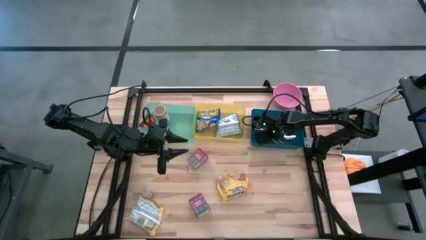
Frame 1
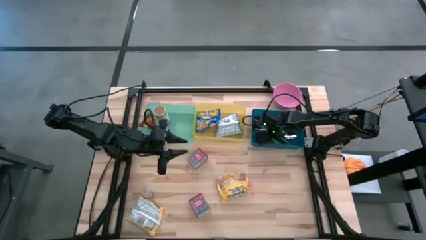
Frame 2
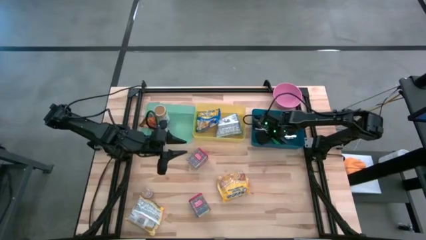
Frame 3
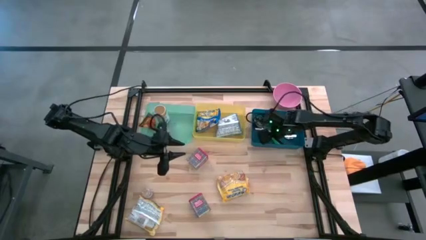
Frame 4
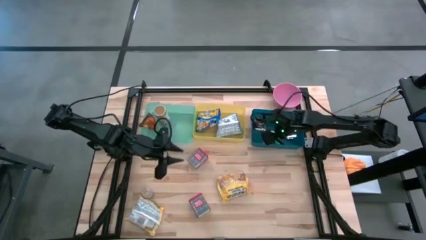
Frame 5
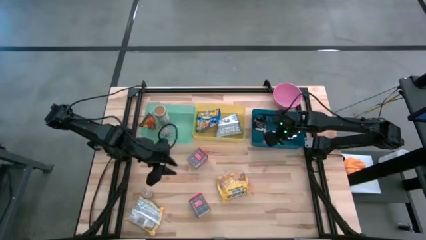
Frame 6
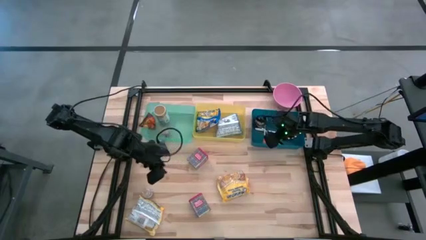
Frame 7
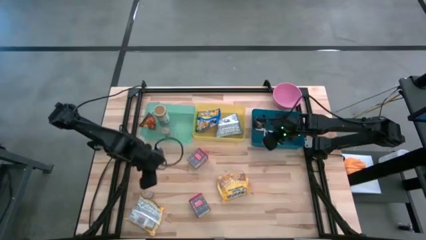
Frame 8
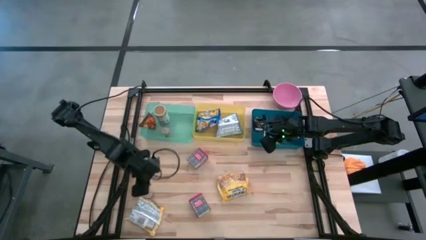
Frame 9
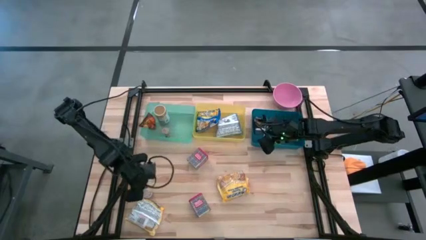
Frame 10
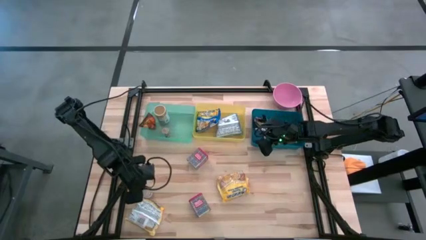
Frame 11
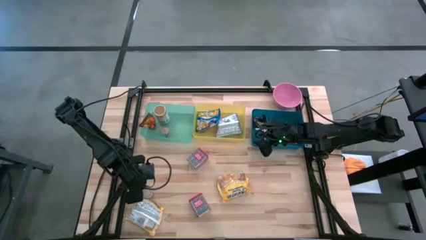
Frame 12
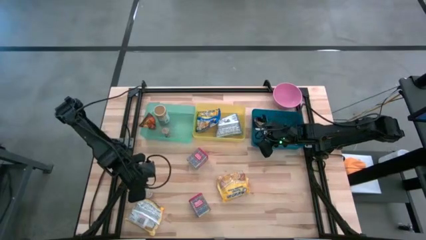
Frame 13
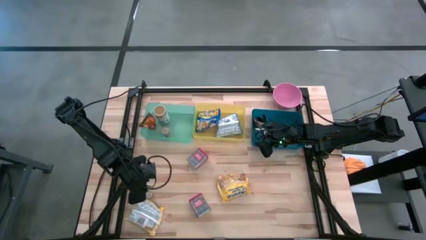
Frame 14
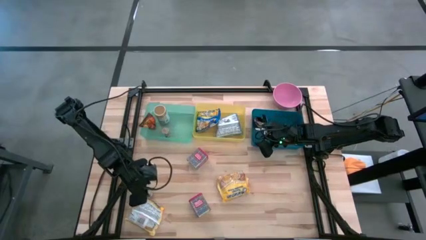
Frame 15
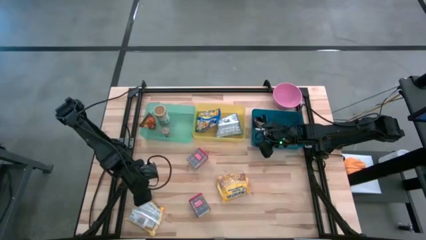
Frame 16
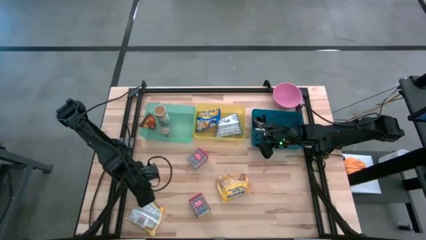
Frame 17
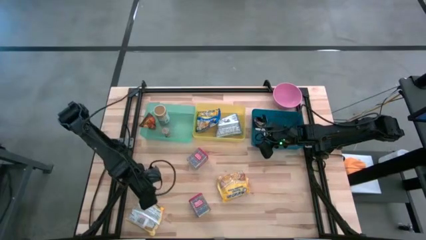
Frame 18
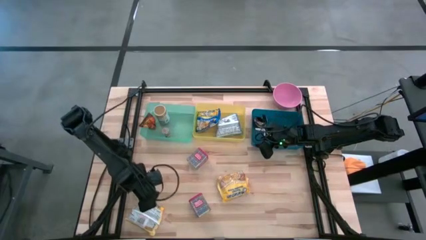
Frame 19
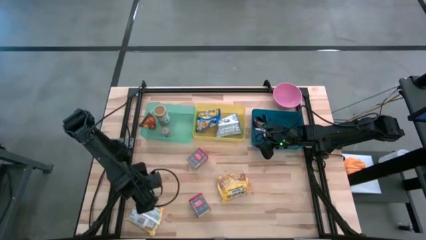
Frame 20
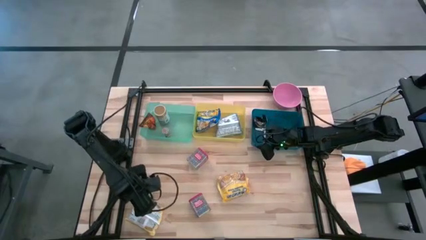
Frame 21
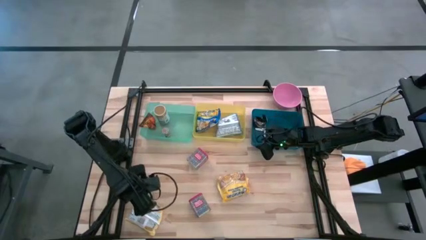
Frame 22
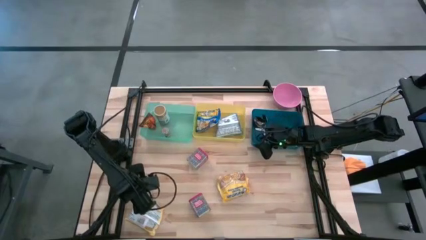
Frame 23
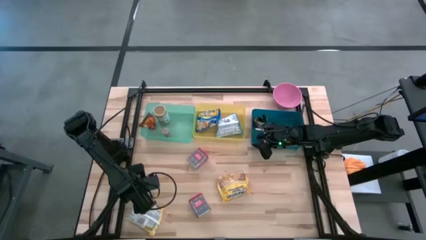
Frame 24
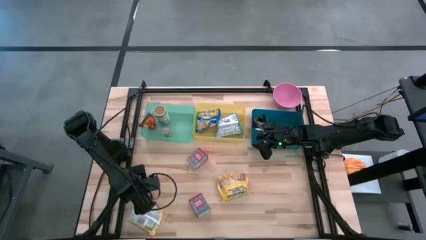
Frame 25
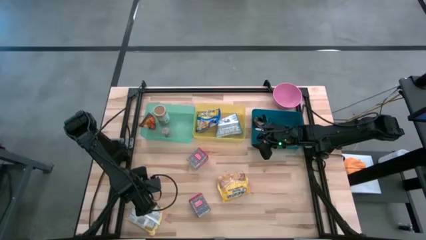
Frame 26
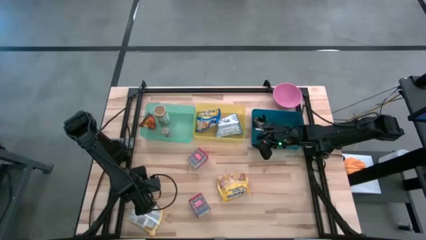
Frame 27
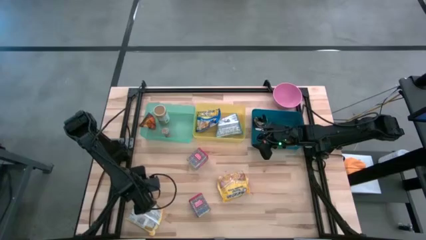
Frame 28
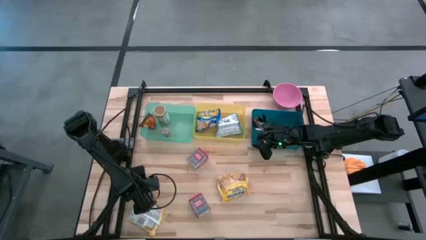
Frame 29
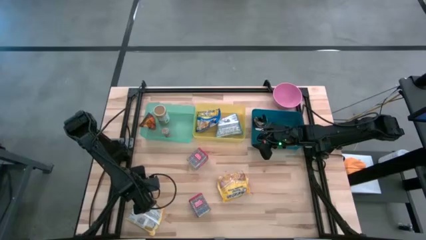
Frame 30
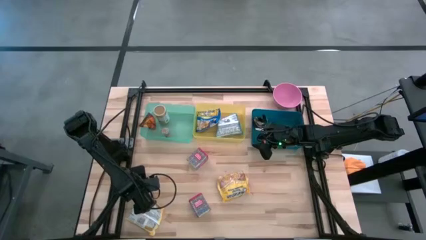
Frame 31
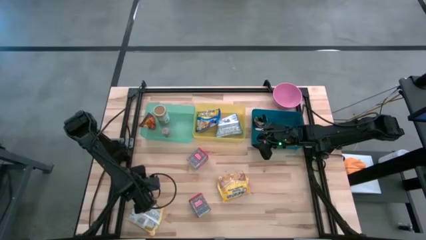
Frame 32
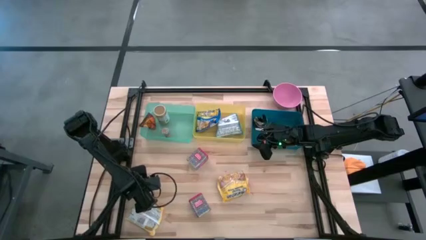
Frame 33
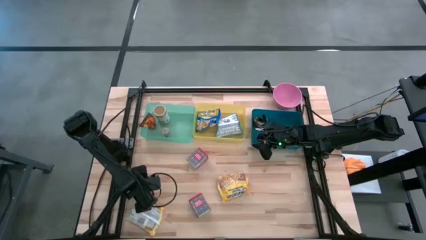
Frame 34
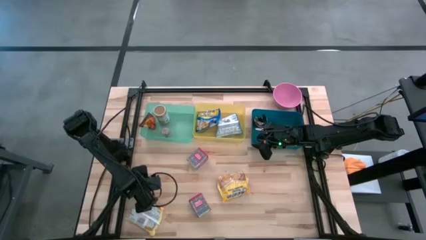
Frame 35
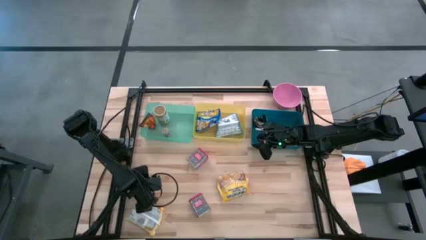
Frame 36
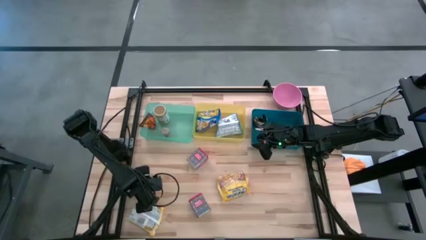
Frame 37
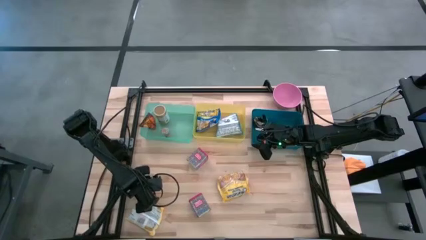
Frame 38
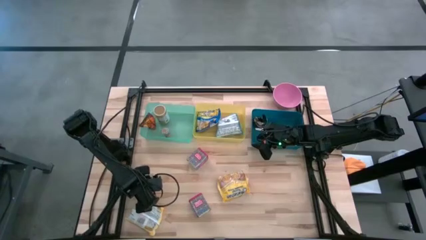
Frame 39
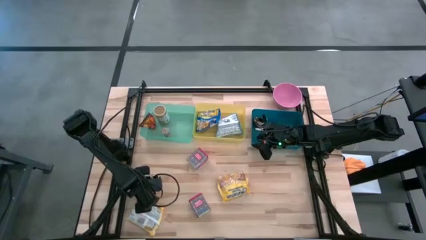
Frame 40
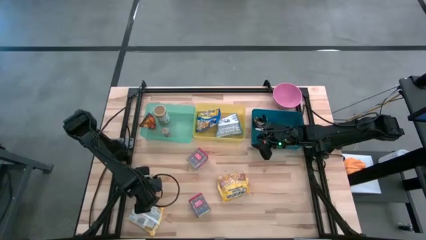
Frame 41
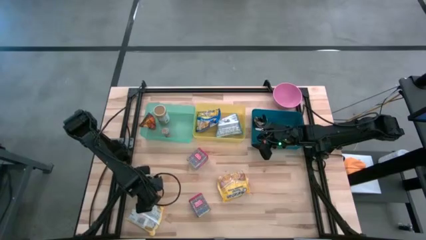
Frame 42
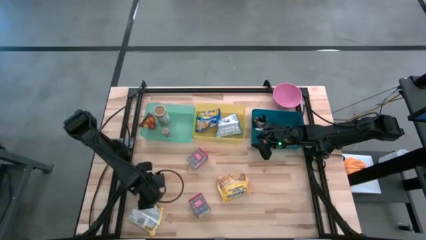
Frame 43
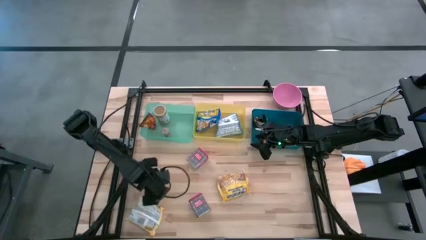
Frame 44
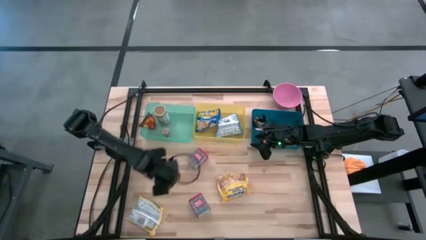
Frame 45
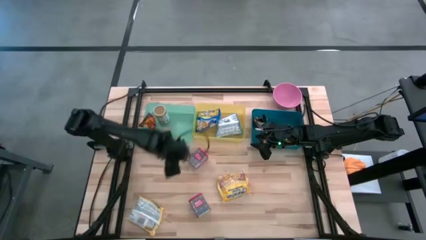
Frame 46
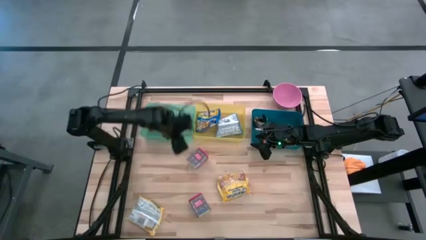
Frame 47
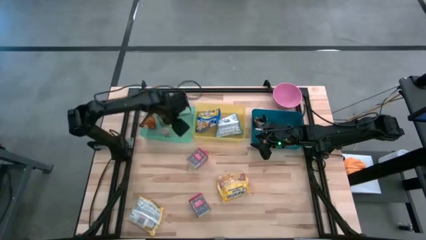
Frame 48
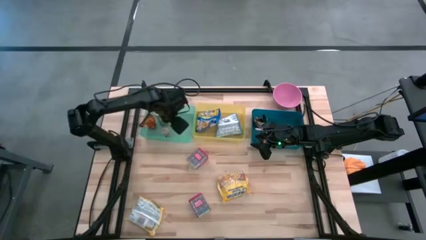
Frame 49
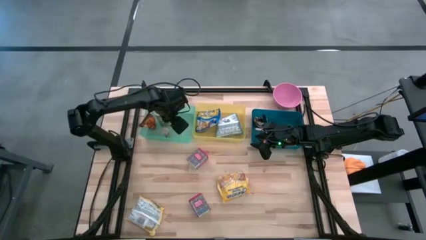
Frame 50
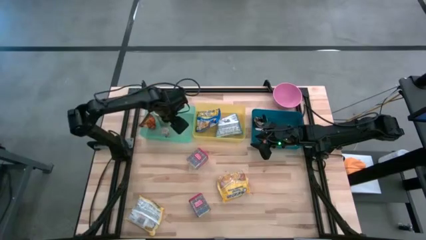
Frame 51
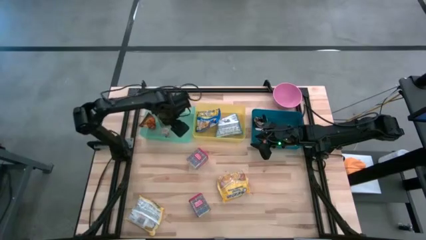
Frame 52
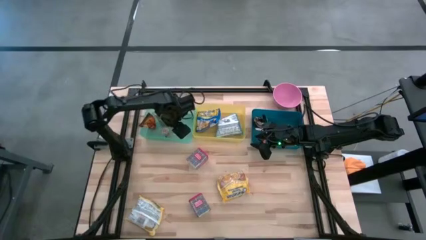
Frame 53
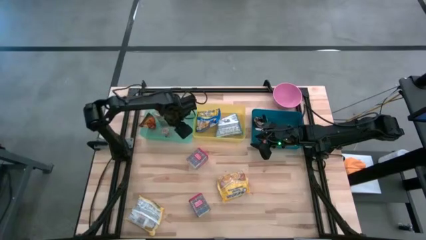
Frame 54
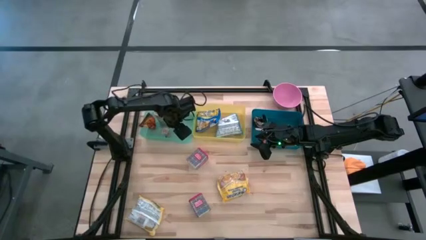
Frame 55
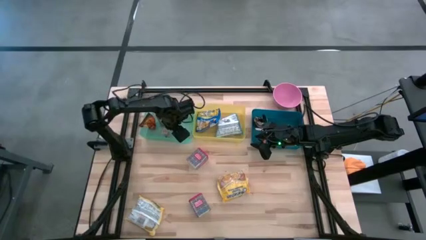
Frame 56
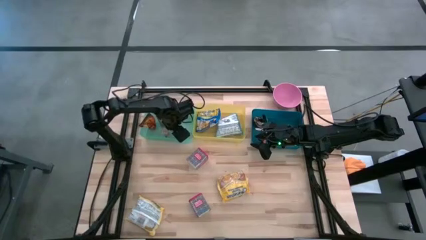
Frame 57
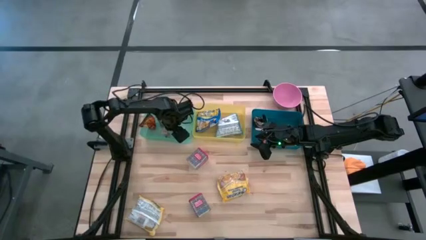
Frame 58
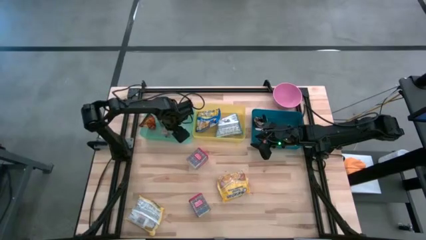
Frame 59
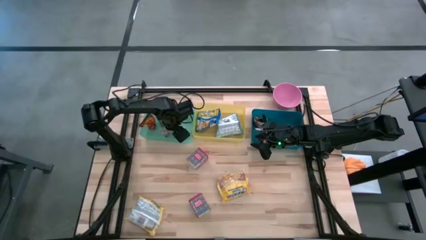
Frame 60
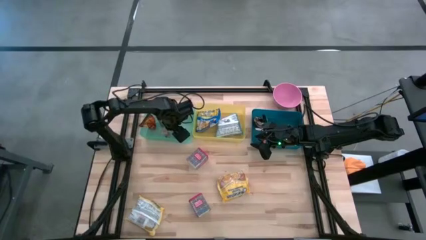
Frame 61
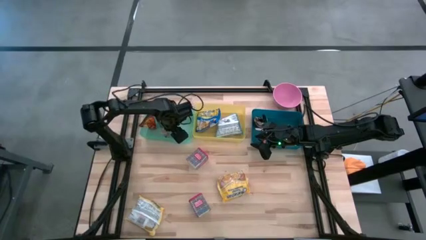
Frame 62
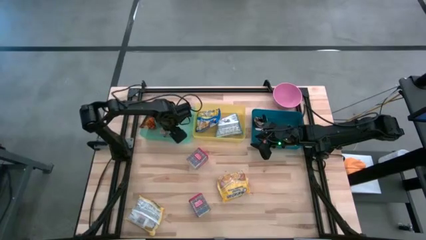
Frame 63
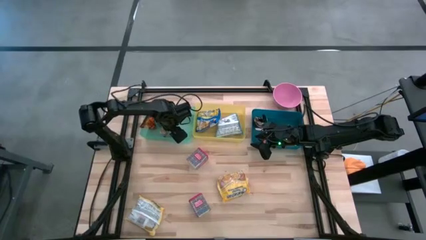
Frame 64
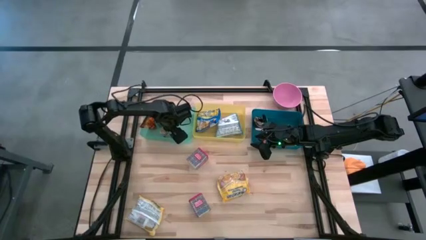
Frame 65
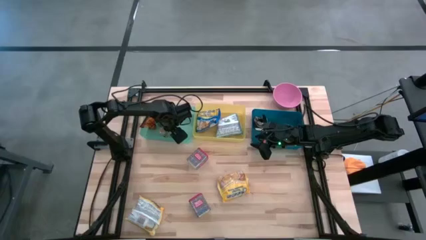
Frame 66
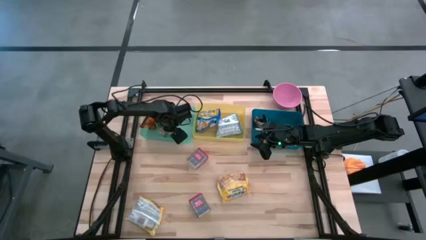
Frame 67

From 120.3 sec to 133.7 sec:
Put the brown seasoning bottle into the green bin
